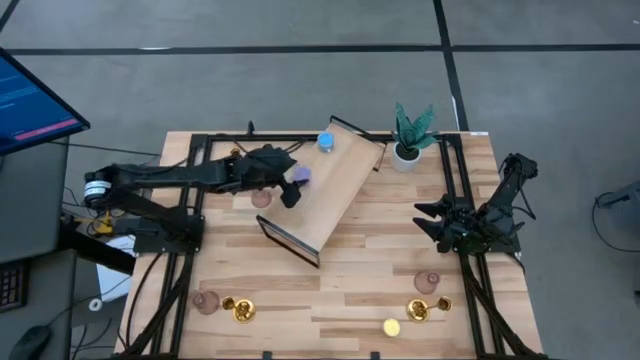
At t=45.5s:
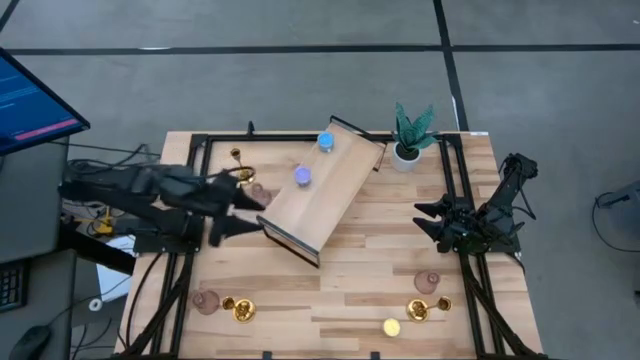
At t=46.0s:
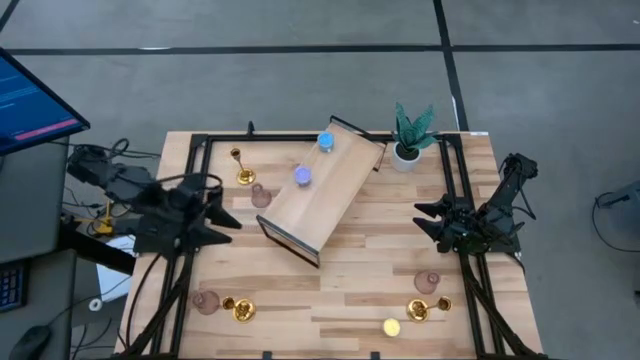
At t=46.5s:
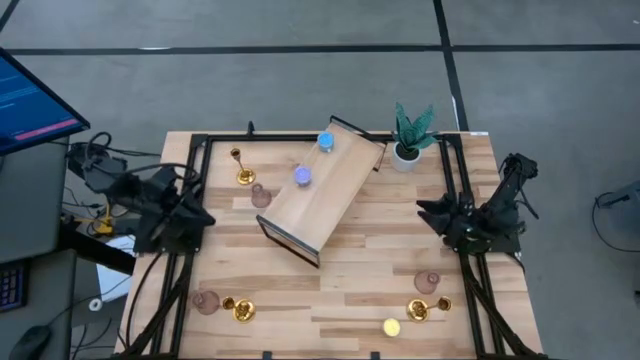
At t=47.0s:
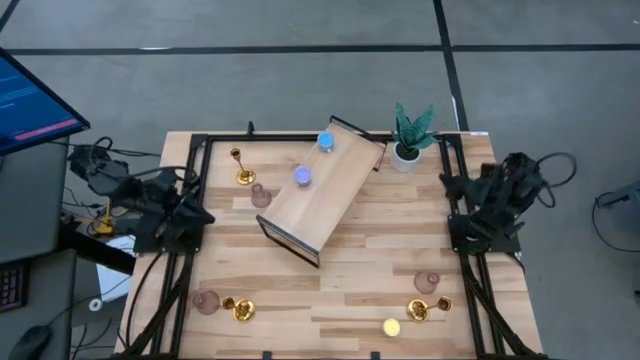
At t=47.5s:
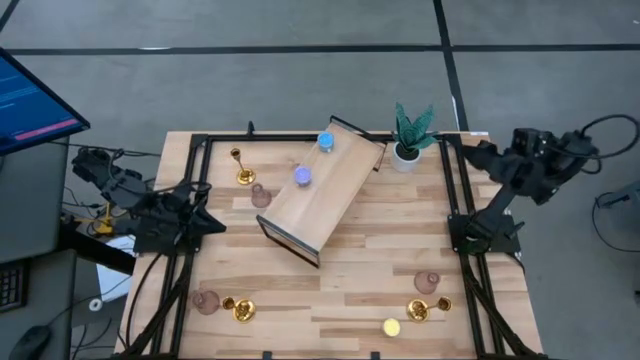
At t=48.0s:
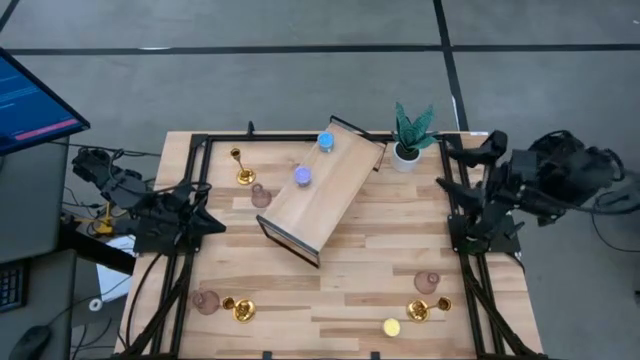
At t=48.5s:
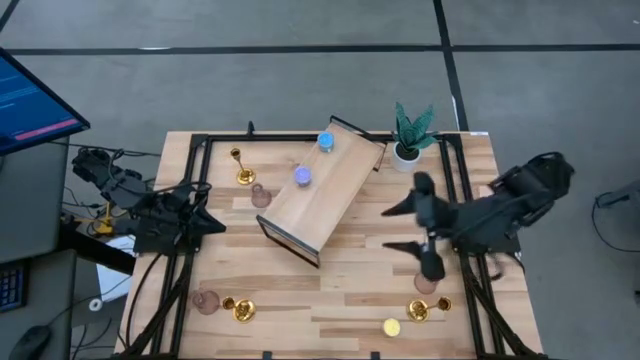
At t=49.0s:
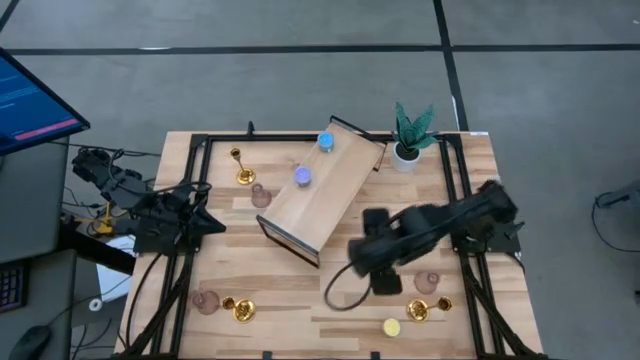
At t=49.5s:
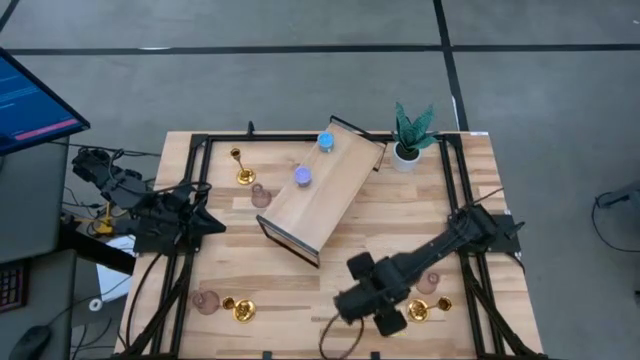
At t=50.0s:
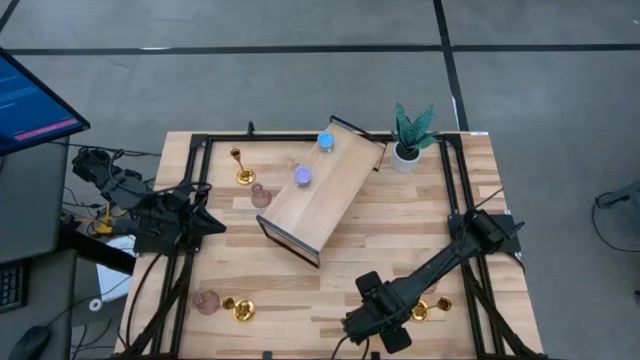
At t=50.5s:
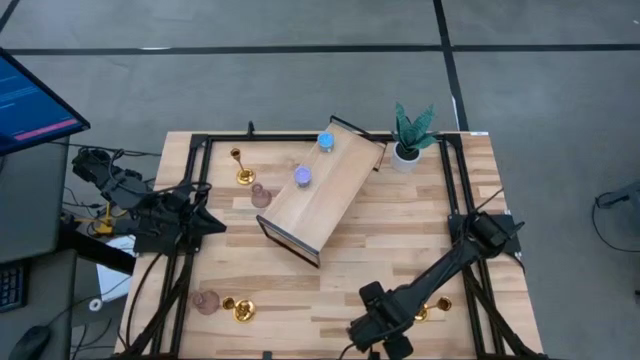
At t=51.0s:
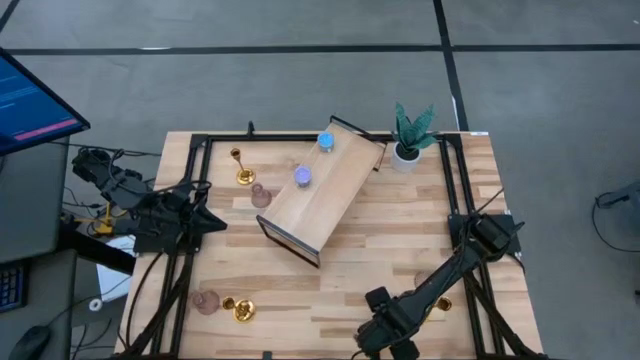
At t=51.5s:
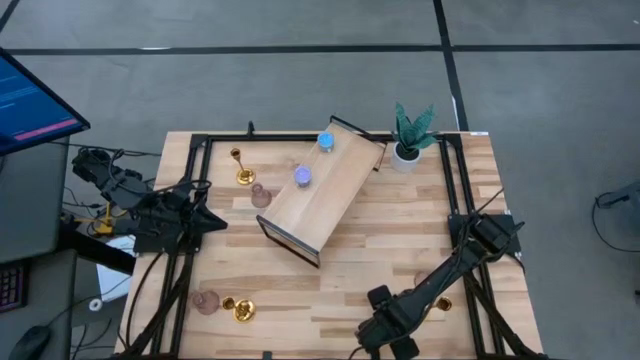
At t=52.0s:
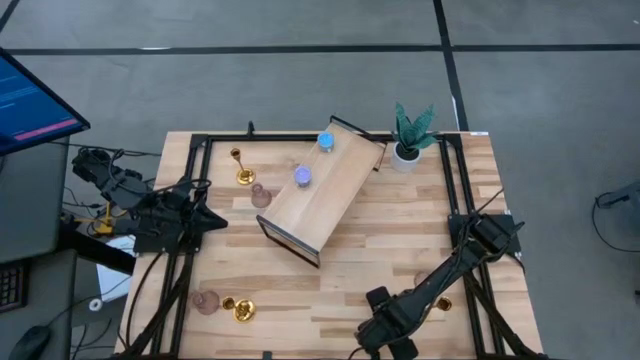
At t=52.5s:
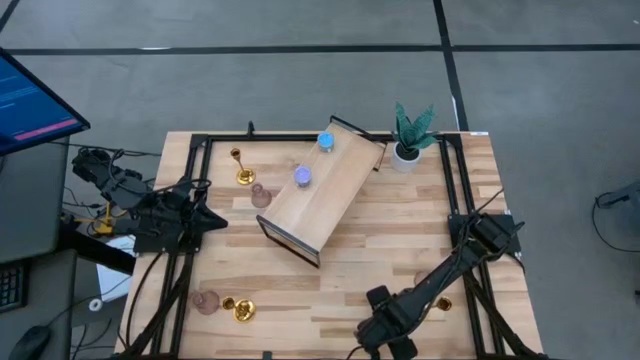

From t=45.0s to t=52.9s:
Task: Pick & Place candle stick holders
Put the yellow candle on the shelf

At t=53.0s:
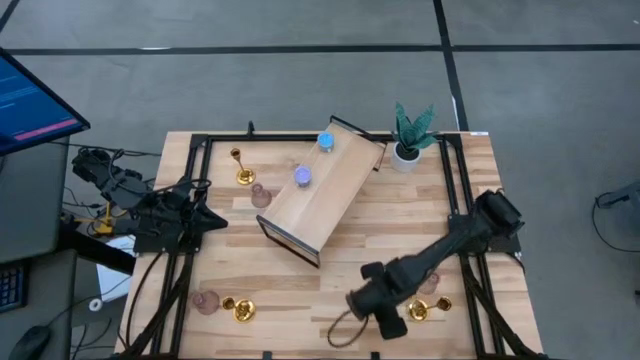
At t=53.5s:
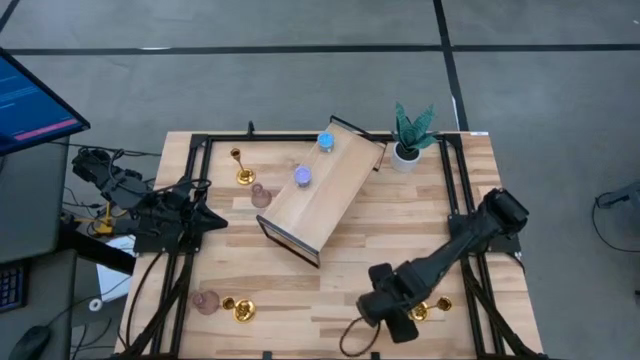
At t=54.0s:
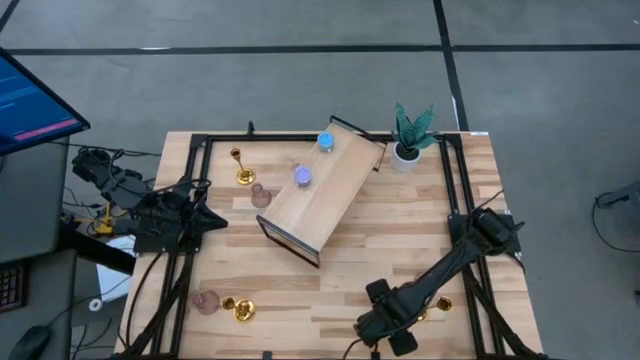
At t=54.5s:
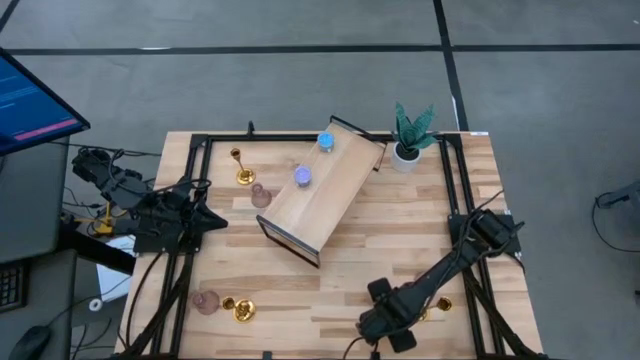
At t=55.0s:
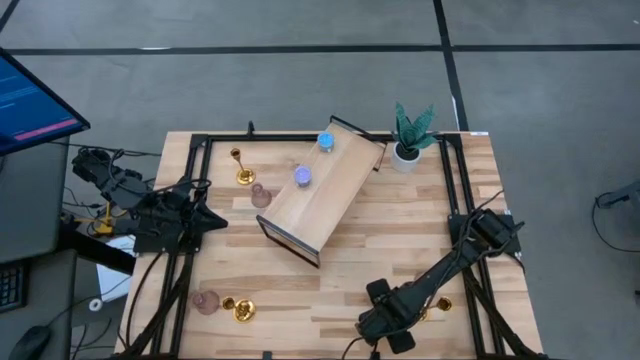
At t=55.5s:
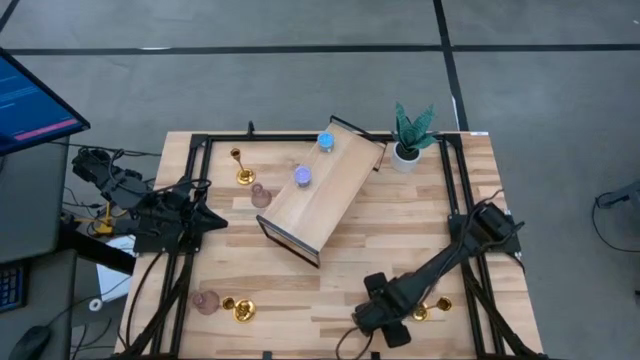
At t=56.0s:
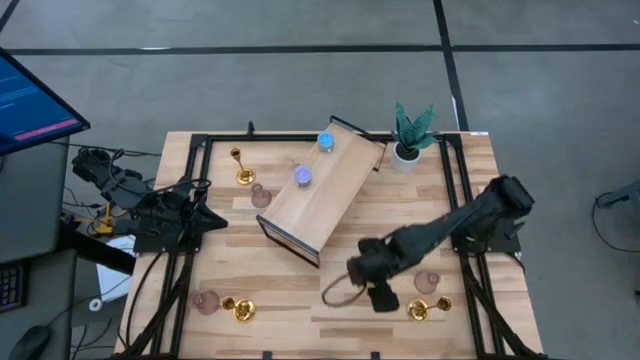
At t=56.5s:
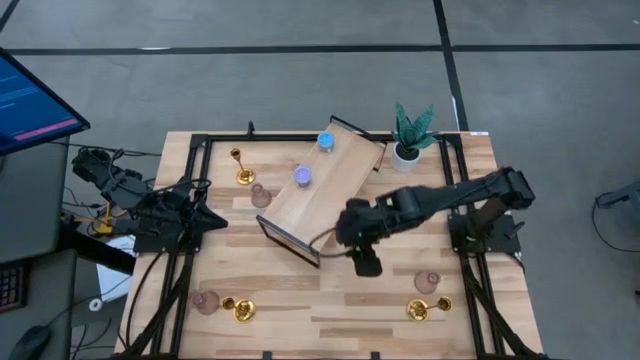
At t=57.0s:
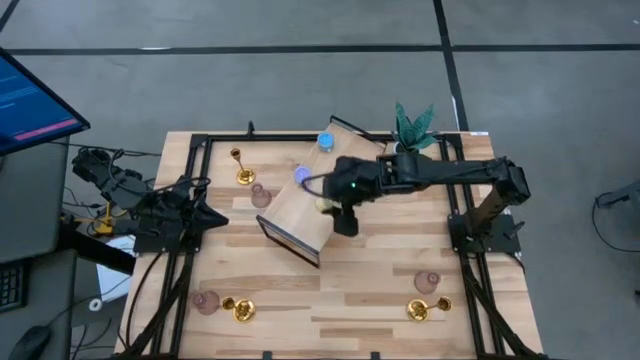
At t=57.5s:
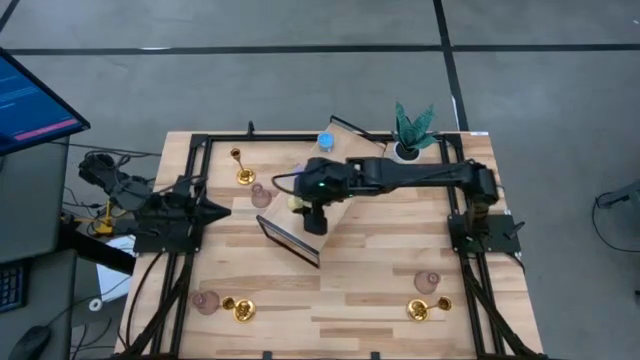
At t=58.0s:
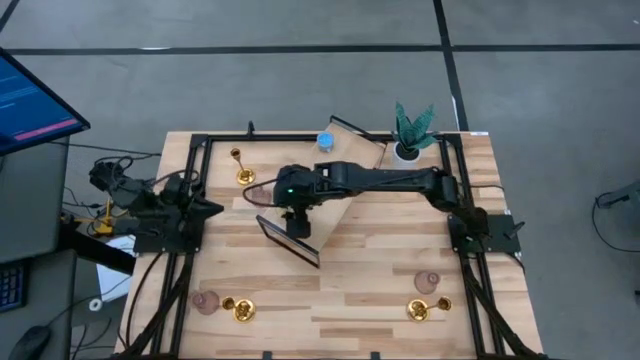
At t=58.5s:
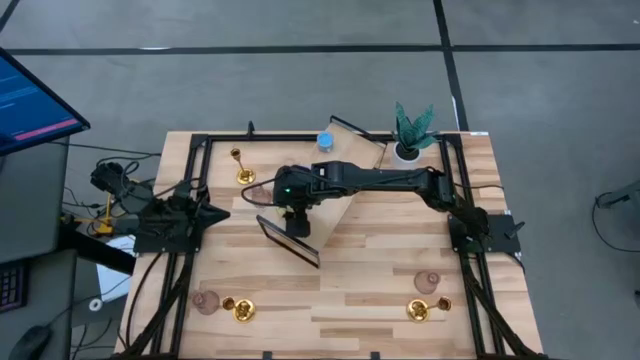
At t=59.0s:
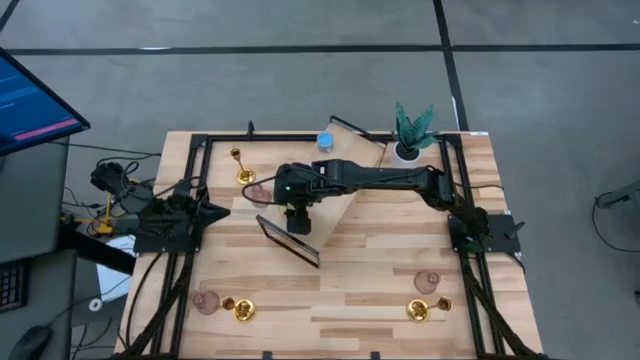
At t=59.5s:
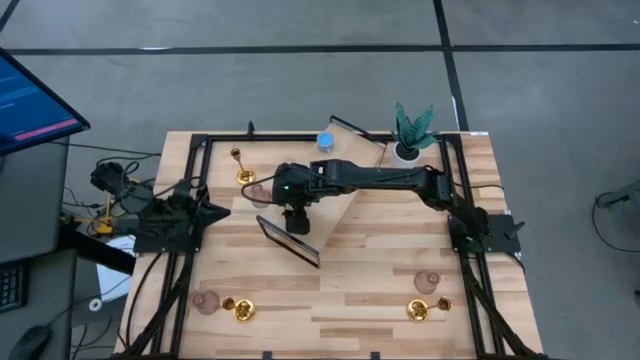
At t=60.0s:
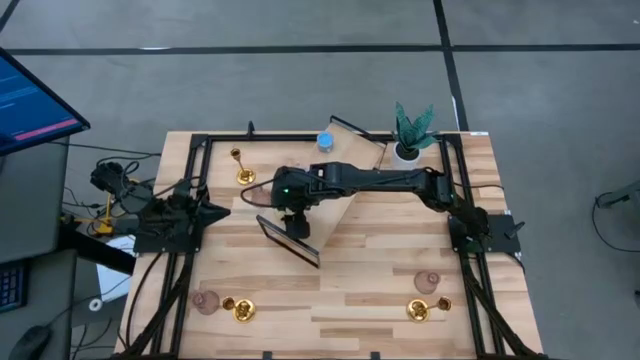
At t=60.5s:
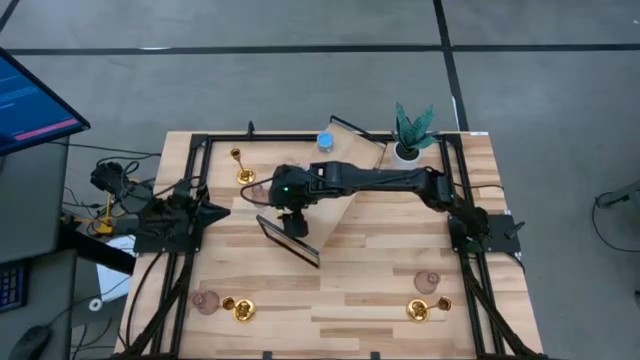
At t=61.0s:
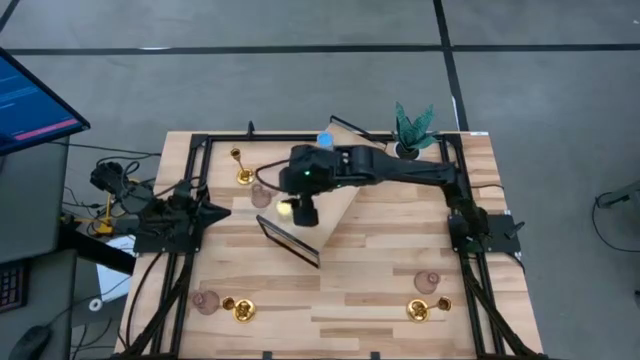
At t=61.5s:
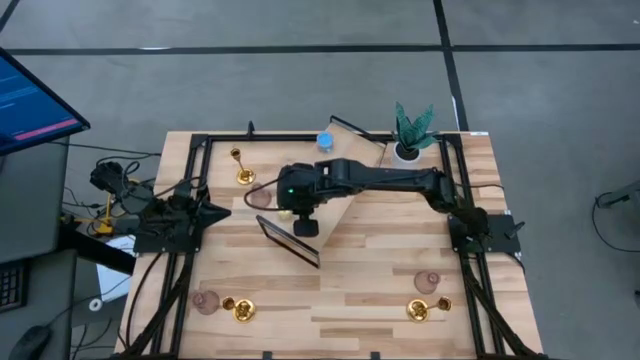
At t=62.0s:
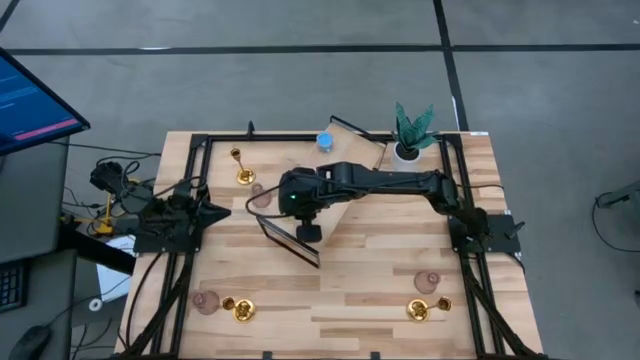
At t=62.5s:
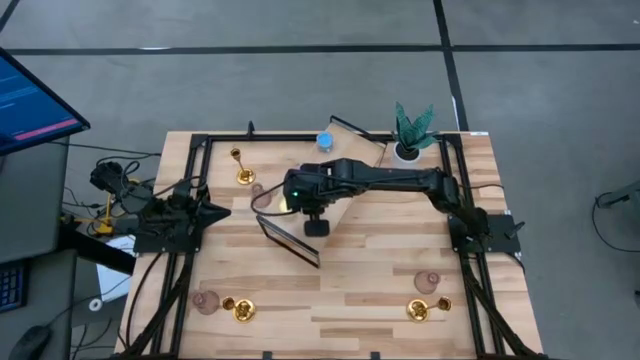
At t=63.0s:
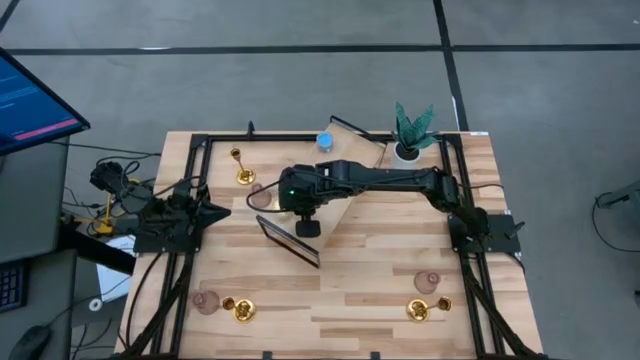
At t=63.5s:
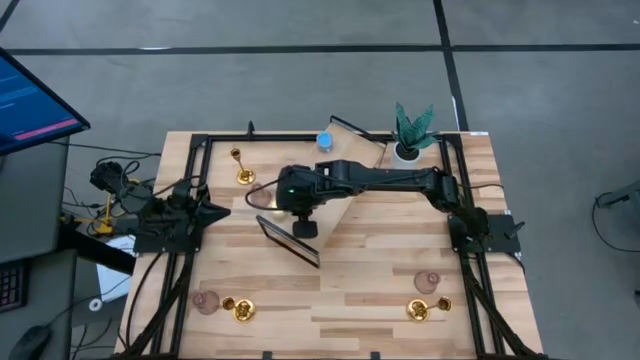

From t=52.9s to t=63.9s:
Put the yellow candle on the shelf

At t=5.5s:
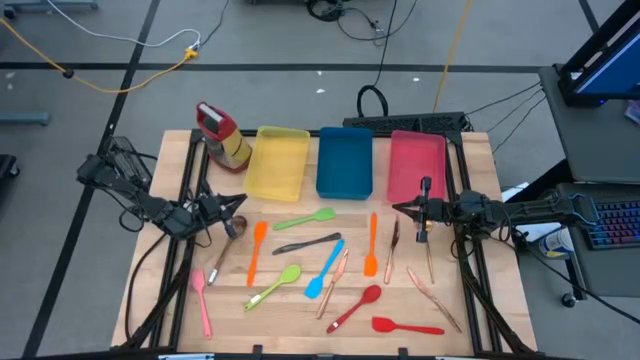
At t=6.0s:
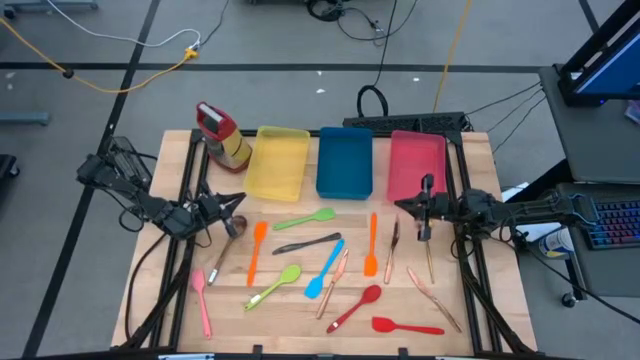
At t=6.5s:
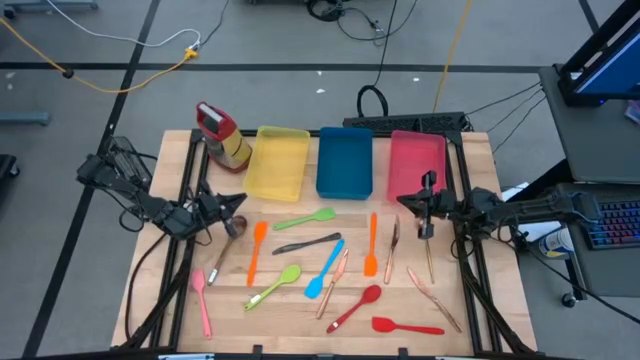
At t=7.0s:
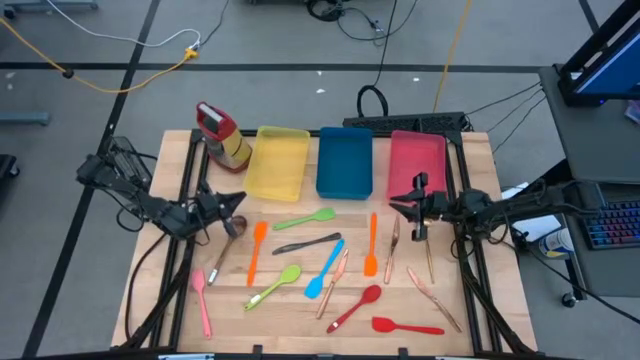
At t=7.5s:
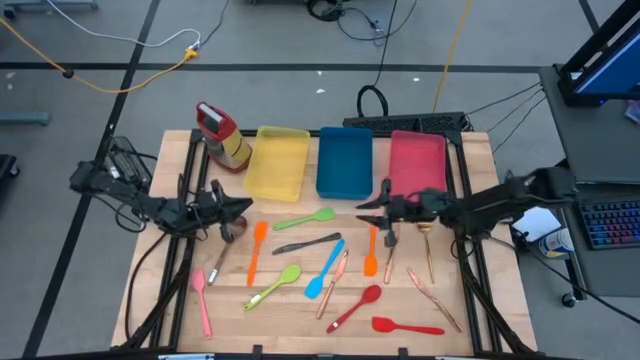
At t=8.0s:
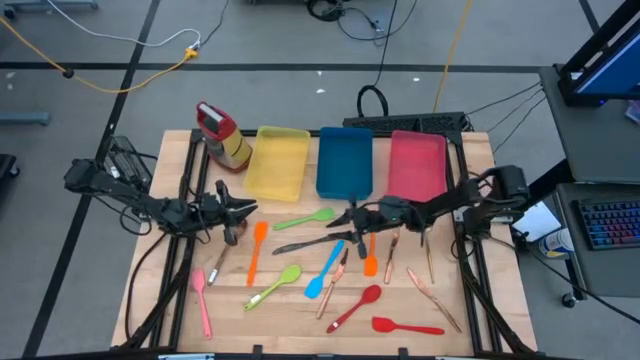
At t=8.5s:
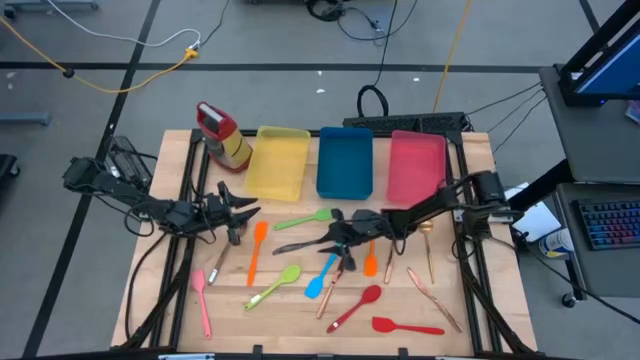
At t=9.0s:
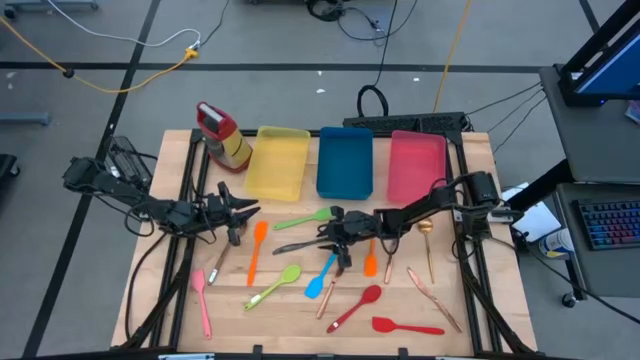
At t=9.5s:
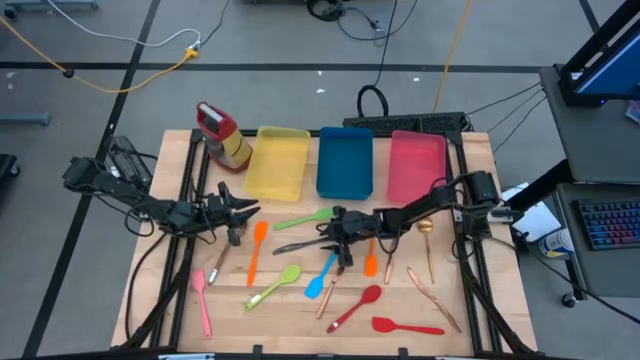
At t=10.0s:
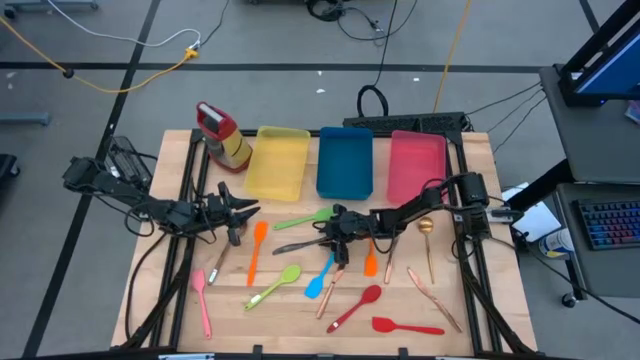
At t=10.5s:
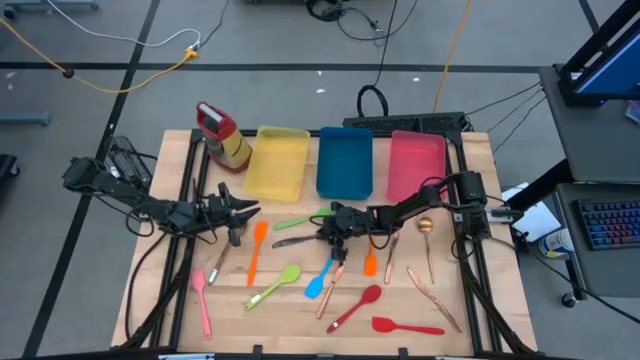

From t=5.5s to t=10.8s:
Task: Pick & Place Kitchen Items
Put the black knife into the yellow bin
